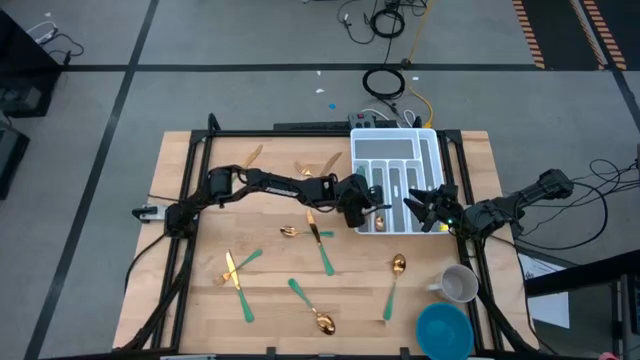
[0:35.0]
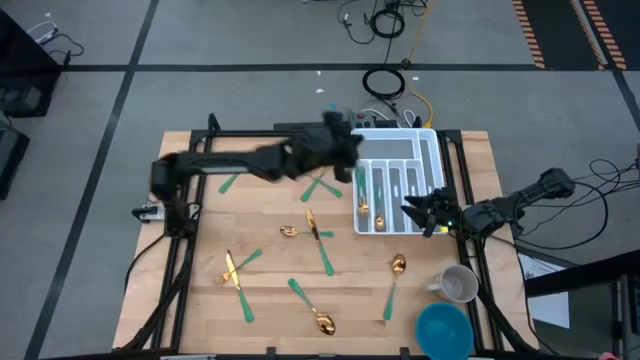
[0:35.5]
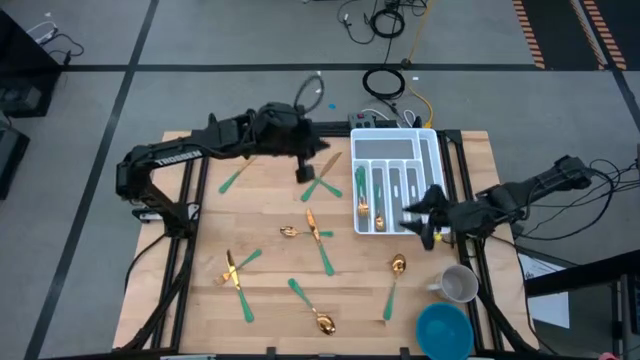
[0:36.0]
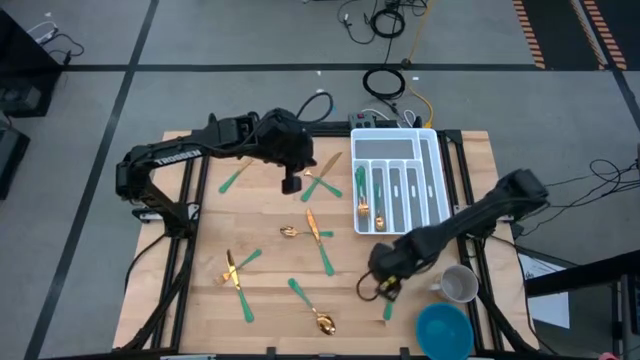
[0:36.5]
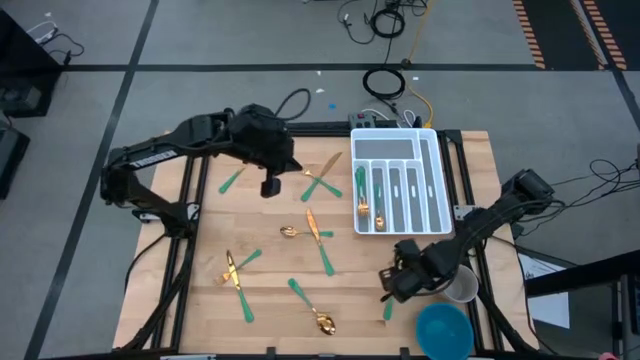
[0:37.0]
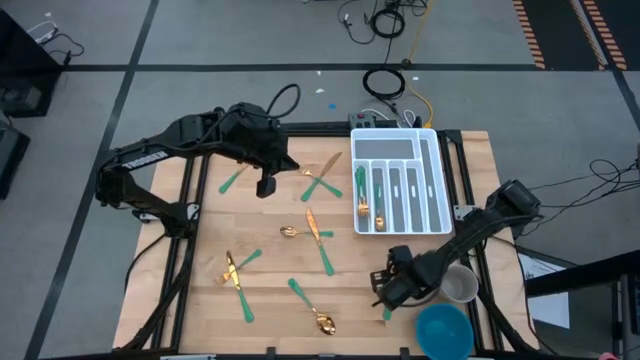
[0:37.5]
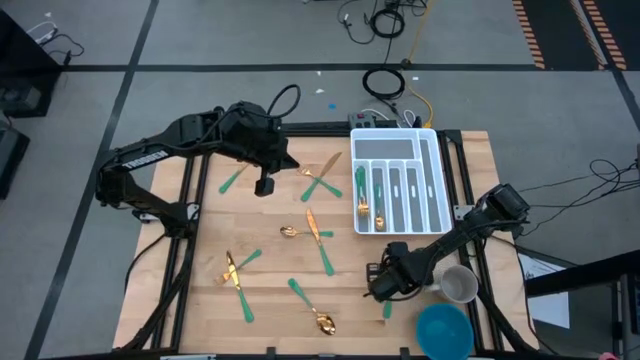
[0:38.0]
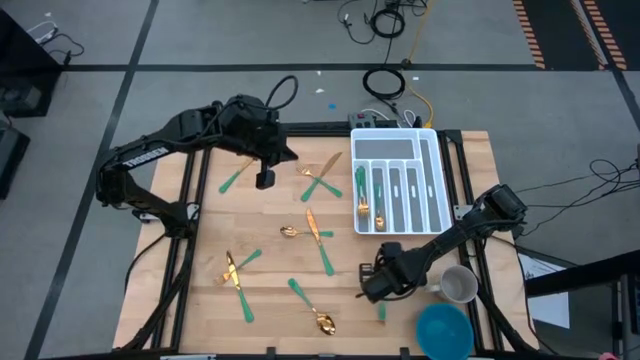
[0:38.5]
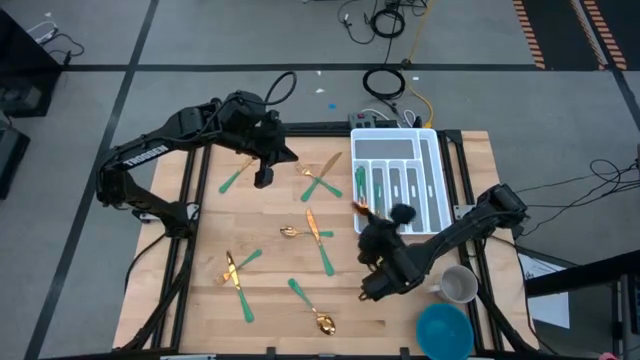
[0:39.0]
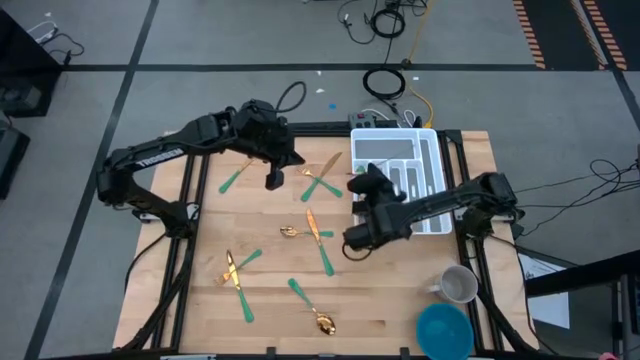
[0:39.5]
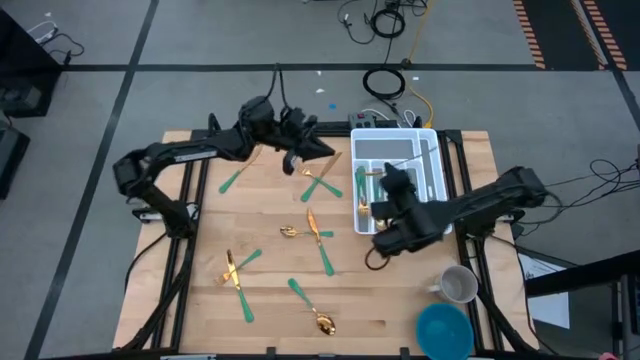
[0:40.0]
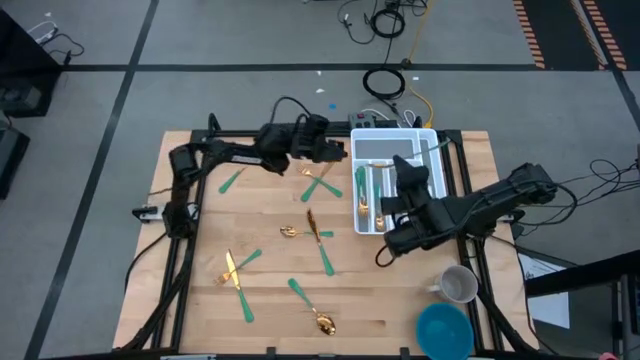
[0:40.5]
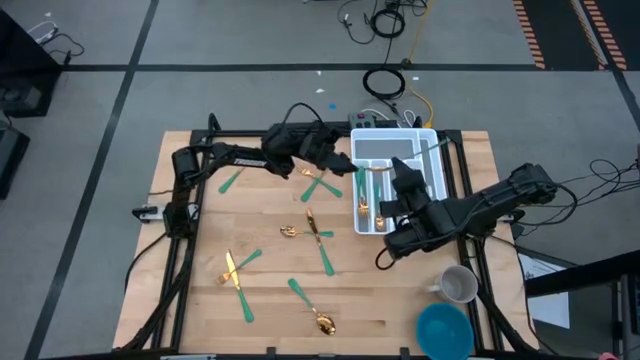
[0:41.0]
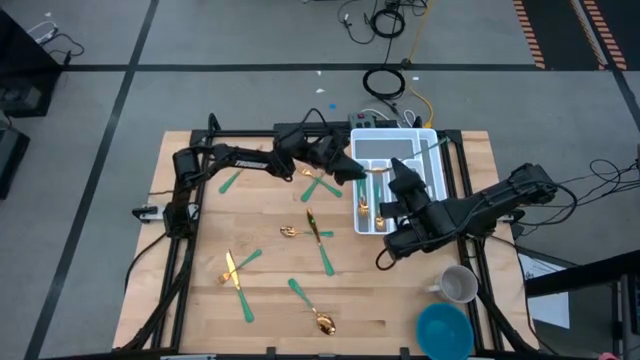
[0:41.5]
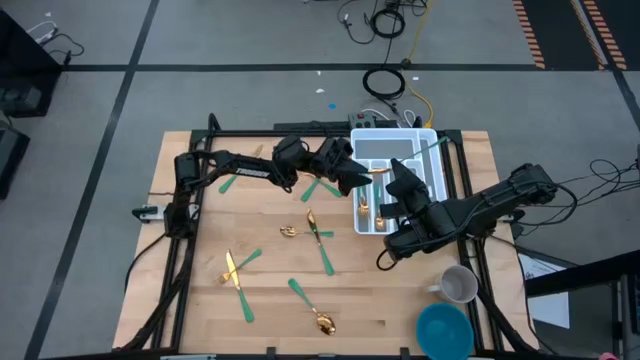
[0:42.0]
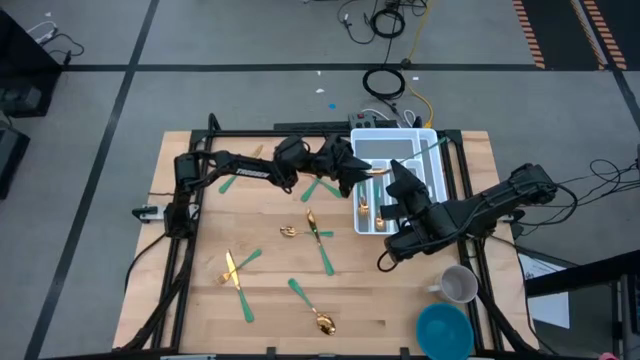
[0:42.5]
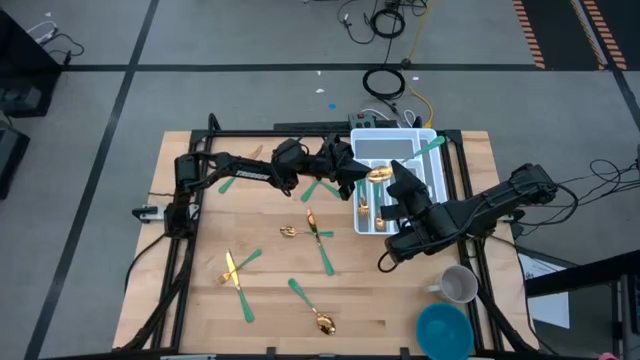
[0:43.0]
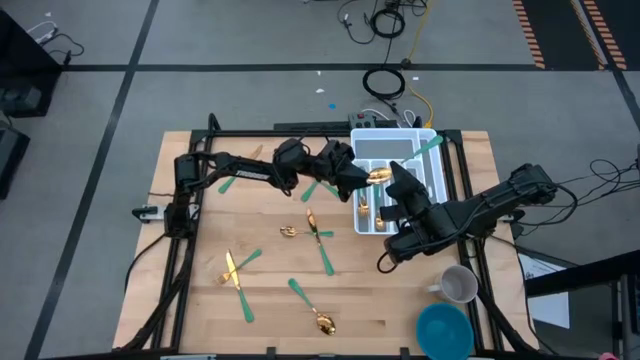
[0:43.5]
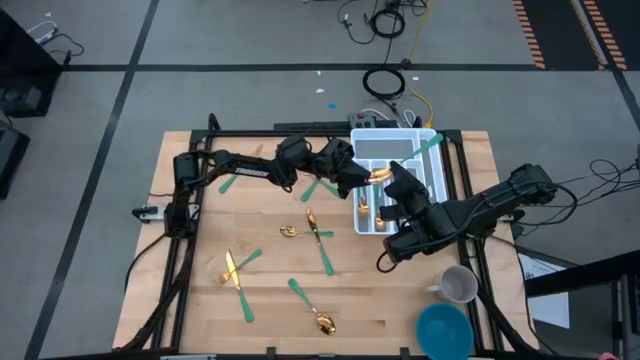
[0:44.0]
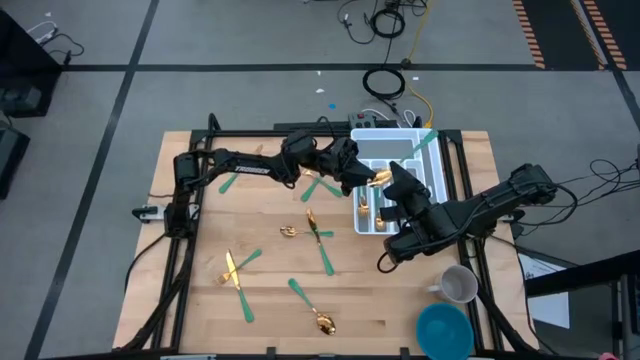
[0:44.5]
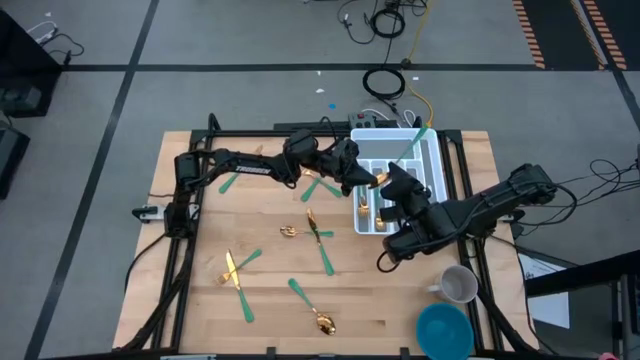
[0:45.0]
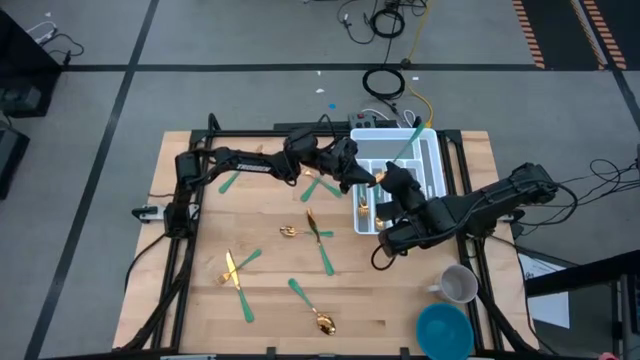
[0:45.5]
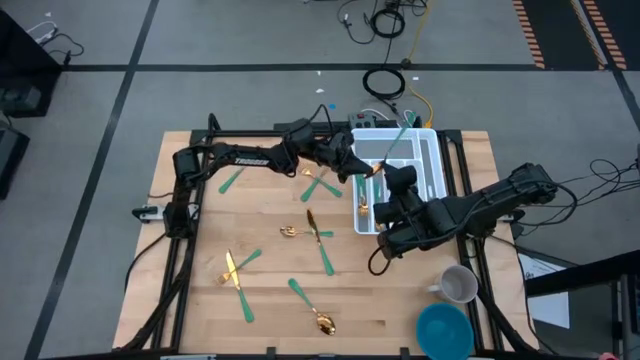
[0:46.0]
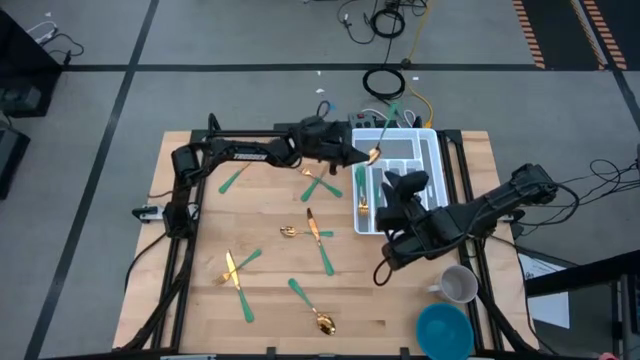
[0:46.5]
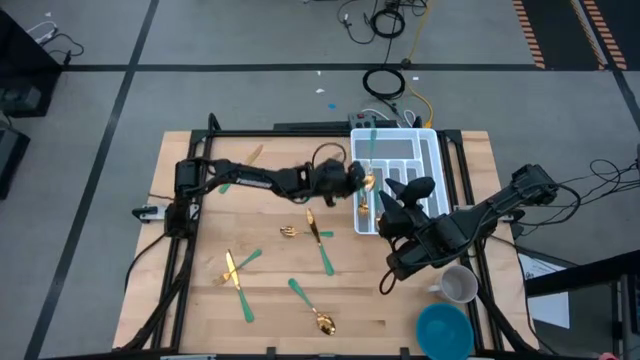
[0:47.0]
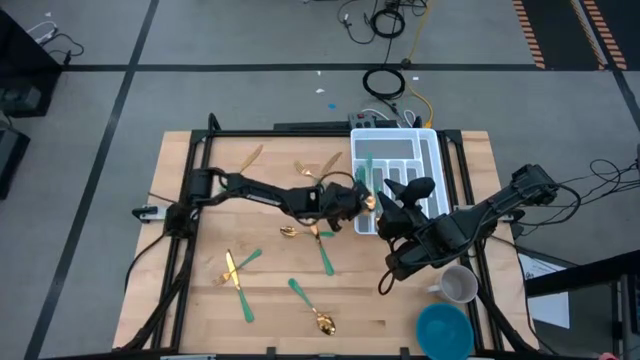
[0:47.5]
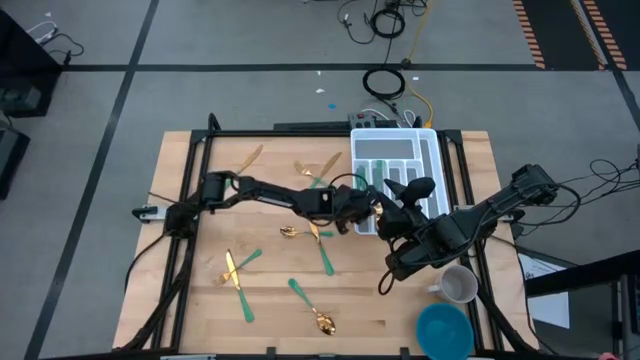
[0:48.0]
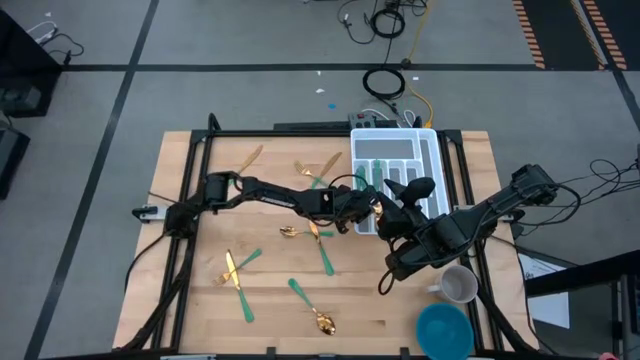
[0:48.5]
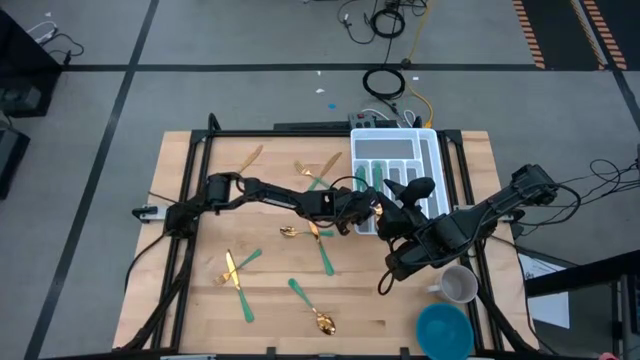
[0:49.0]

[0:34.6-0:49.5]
Task: Sort silverware
Put the spoon into the silverware tray

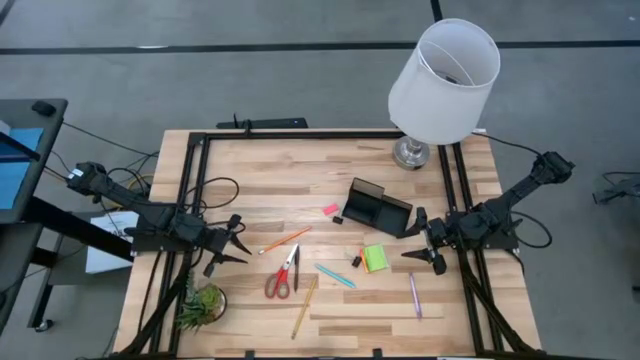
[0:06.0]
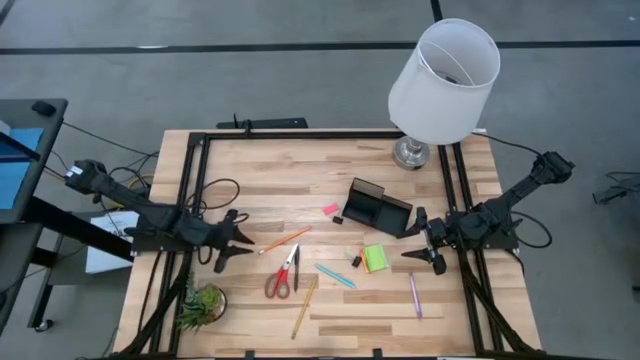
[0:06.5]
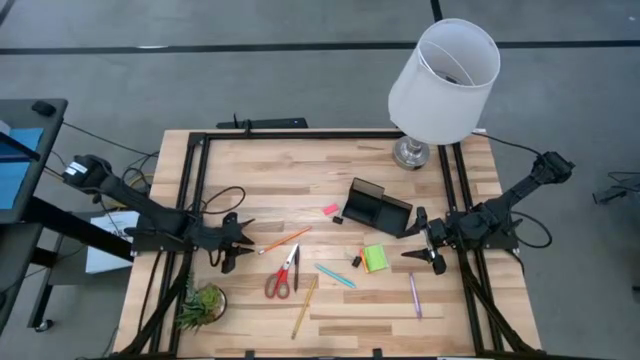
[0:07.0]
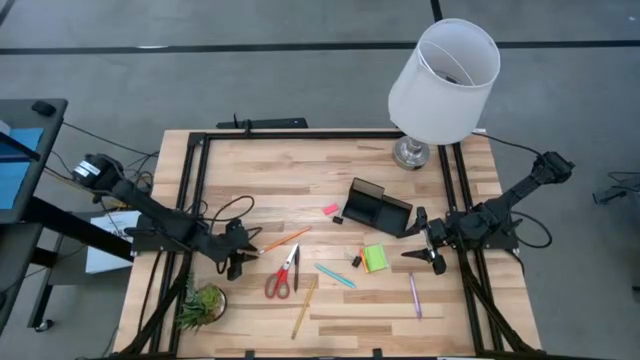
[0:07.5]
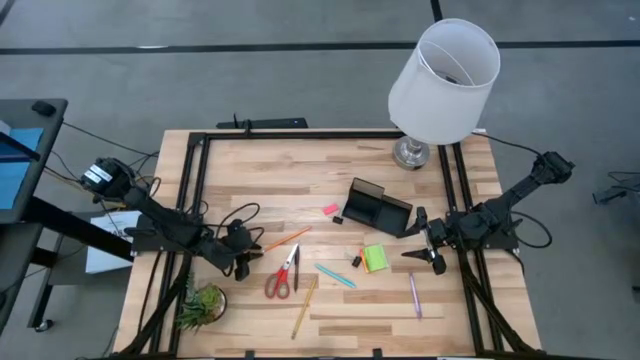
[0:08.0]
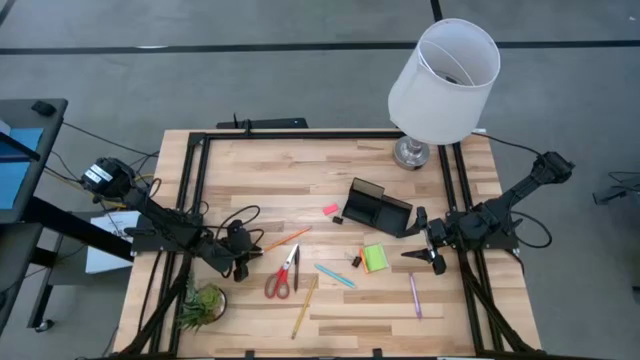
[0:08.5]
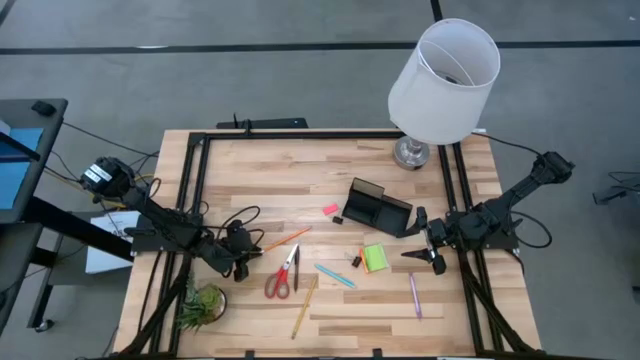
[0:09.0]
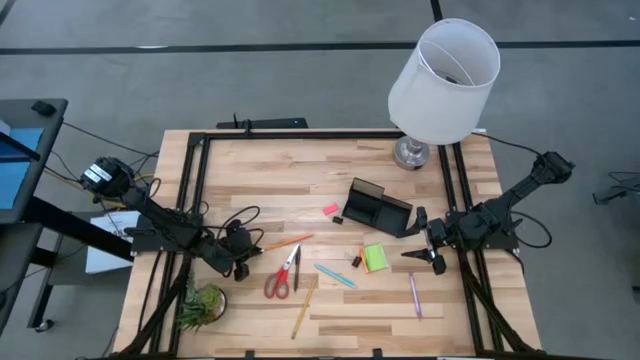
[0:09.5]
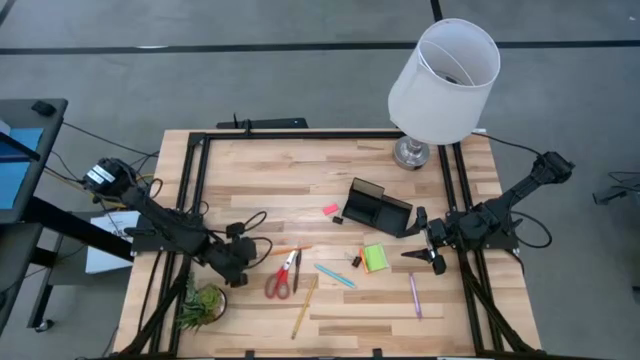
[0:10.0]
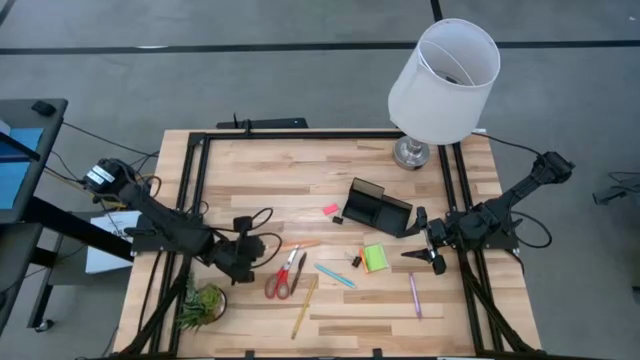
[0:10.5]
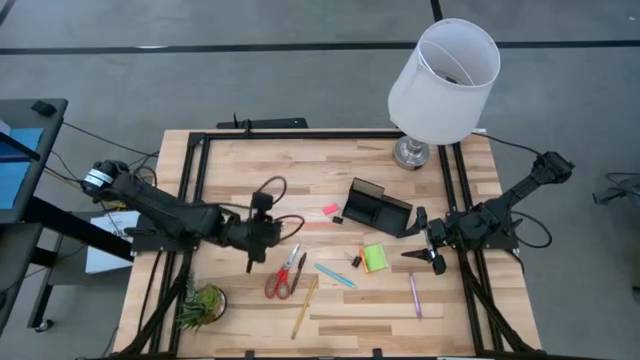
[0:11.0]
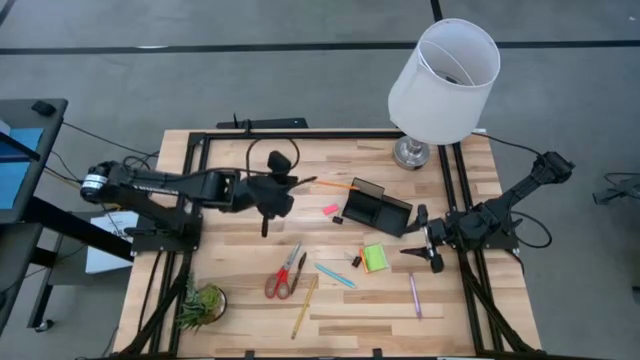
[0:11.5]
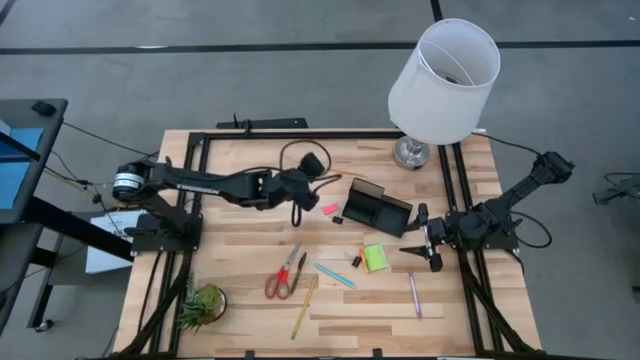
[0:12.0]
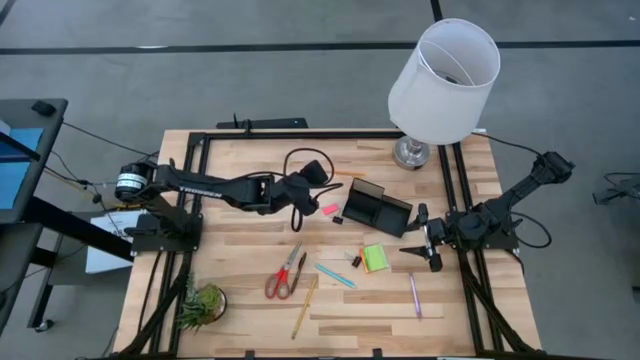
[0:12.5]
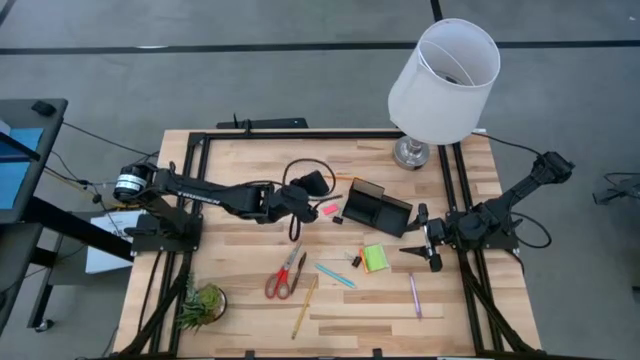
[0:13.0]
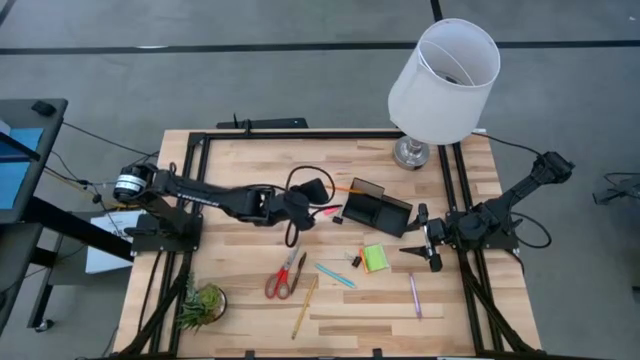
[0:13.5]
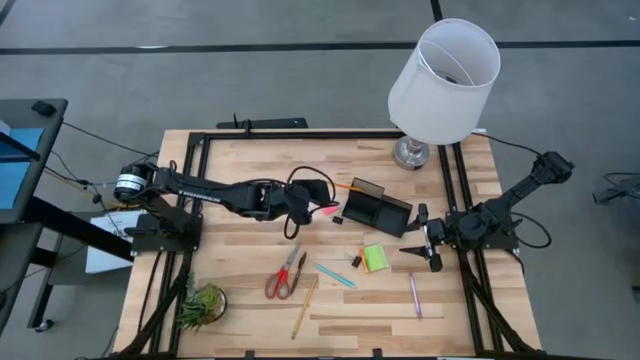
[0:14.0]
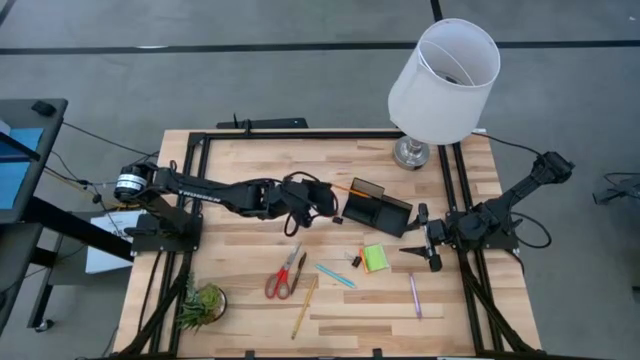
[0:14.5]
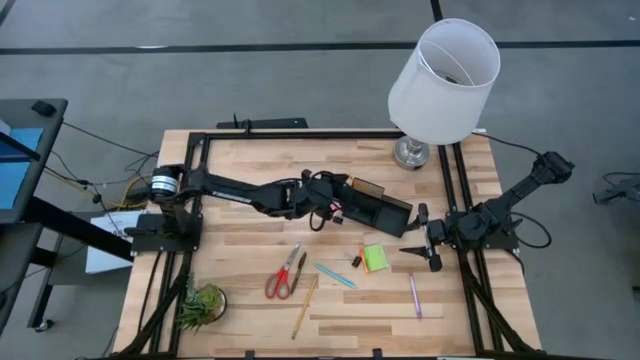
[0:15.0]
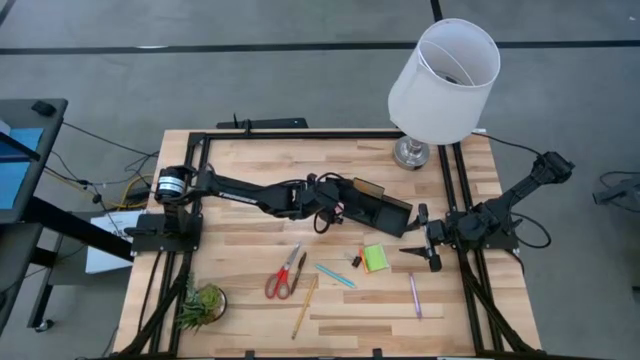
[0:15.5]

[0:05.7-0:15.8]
Task: Pick and place office supplies into organizer
Put the orange pencil into the desk organizer
